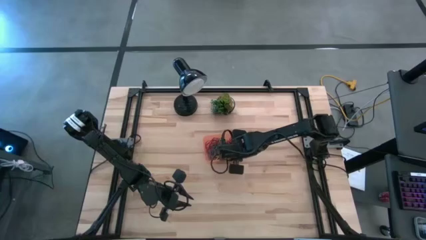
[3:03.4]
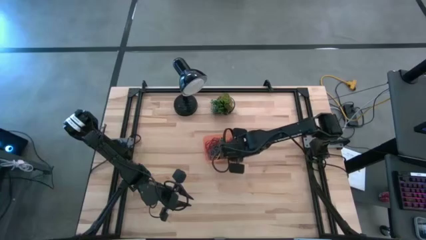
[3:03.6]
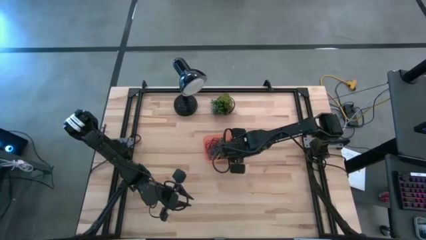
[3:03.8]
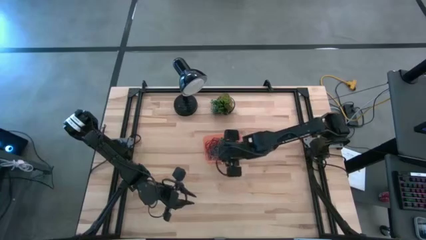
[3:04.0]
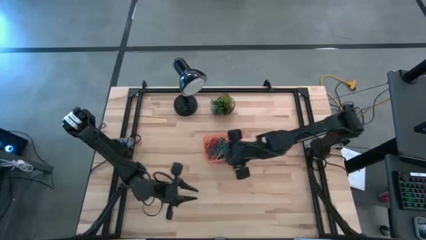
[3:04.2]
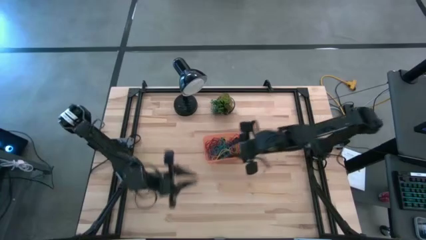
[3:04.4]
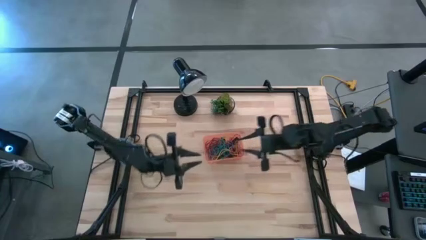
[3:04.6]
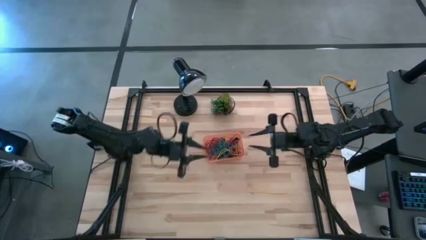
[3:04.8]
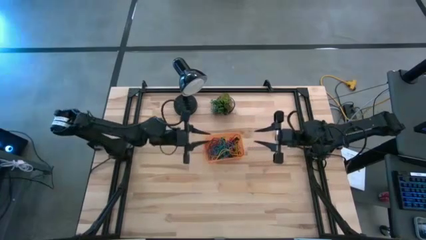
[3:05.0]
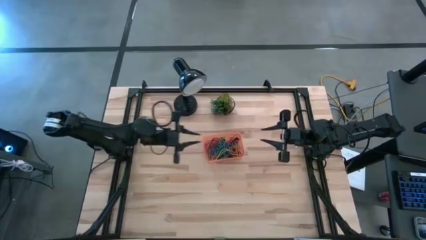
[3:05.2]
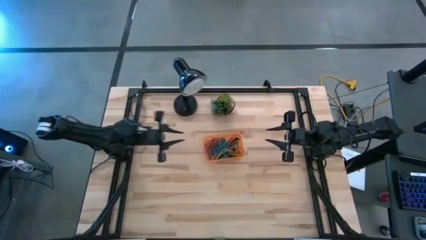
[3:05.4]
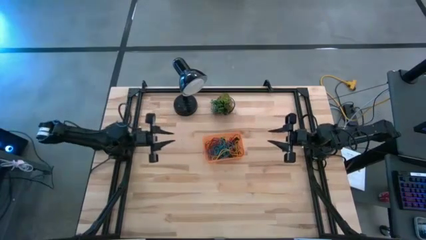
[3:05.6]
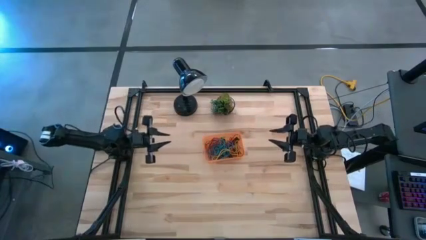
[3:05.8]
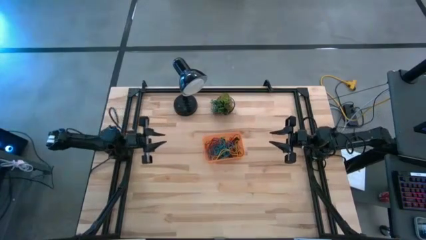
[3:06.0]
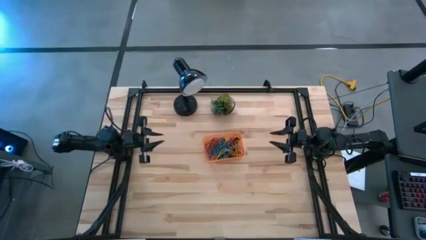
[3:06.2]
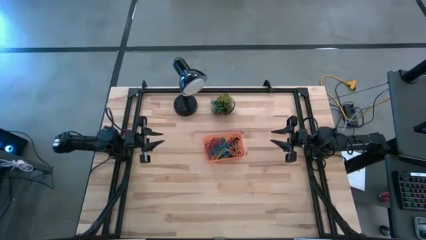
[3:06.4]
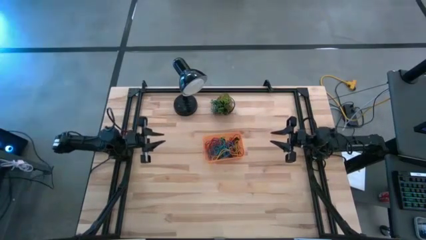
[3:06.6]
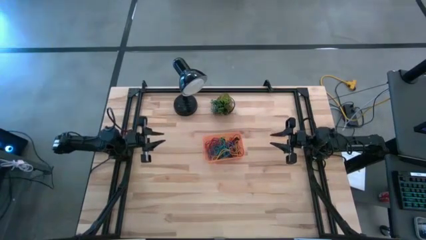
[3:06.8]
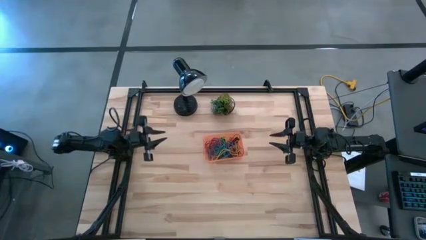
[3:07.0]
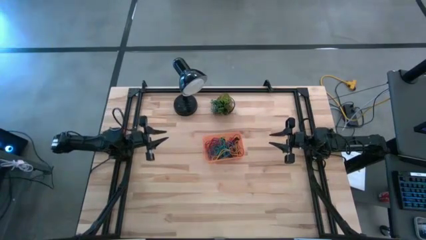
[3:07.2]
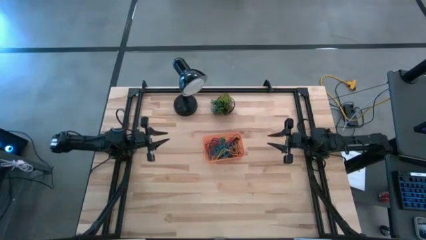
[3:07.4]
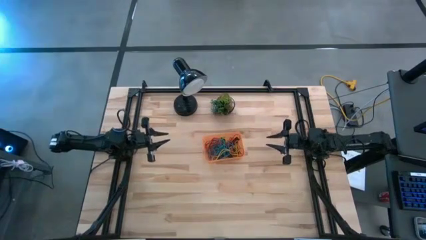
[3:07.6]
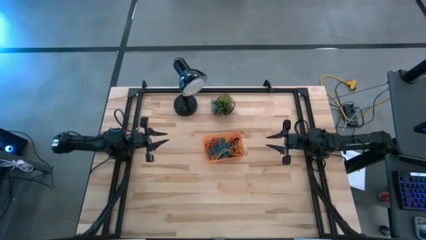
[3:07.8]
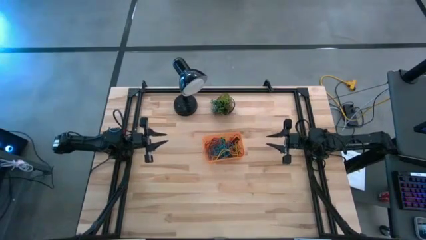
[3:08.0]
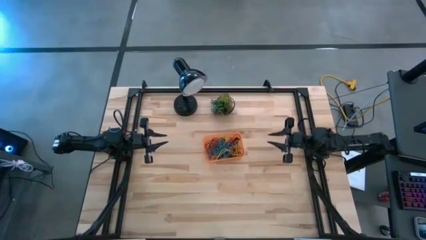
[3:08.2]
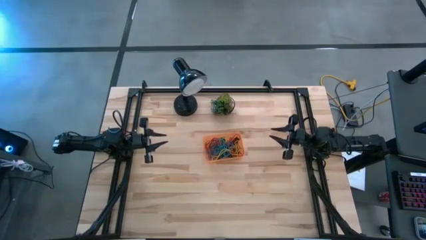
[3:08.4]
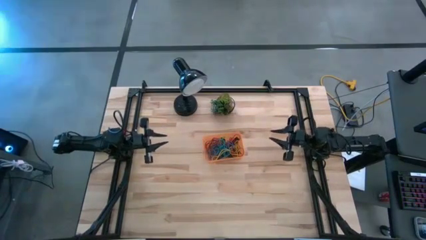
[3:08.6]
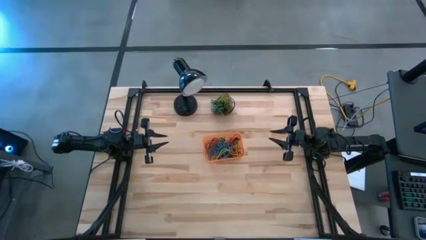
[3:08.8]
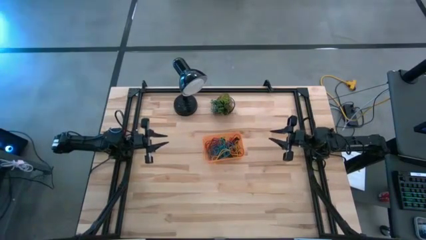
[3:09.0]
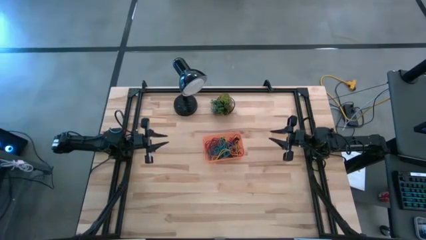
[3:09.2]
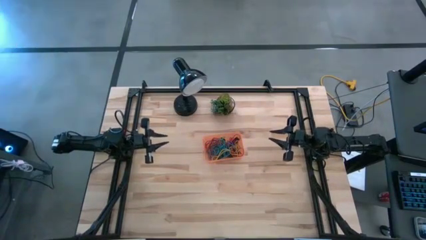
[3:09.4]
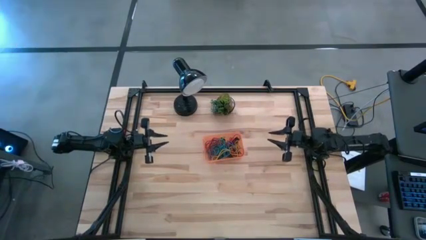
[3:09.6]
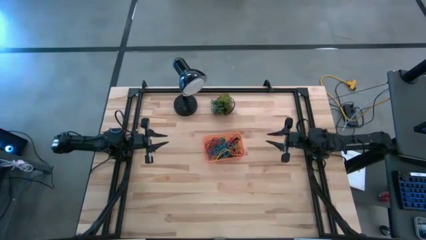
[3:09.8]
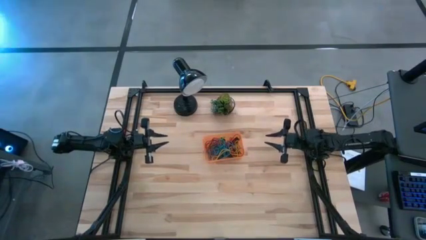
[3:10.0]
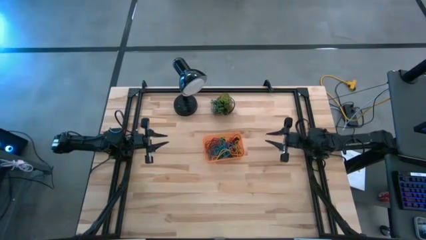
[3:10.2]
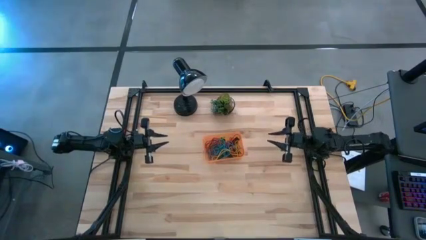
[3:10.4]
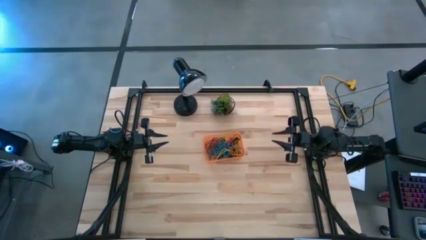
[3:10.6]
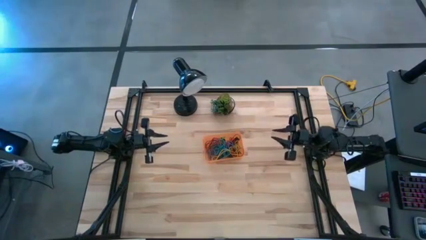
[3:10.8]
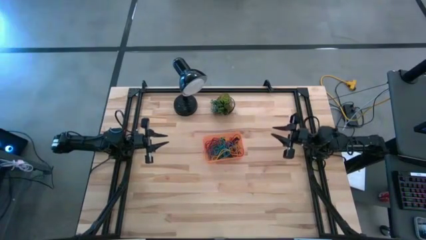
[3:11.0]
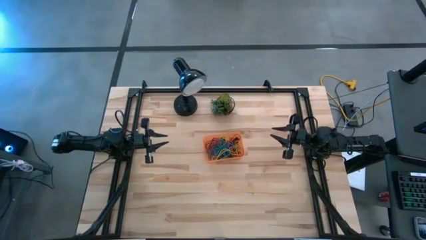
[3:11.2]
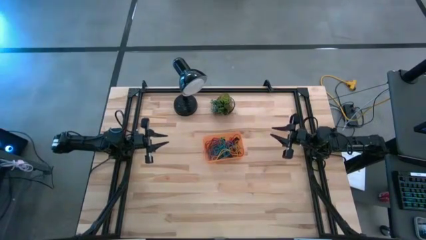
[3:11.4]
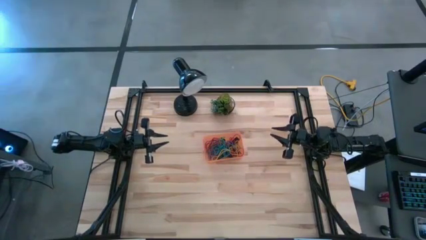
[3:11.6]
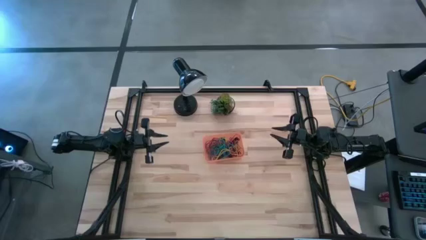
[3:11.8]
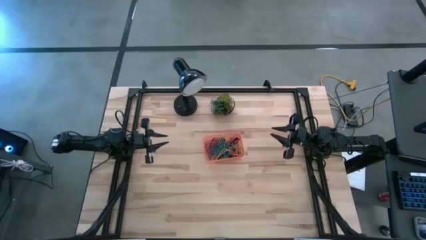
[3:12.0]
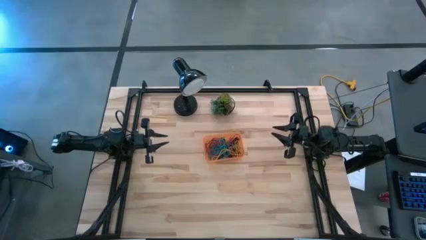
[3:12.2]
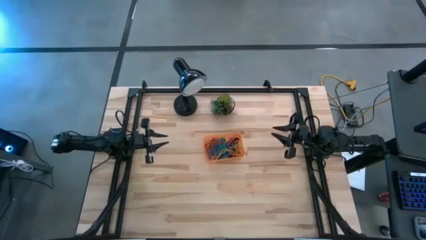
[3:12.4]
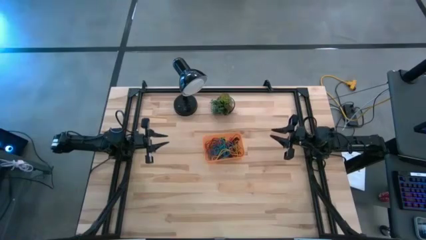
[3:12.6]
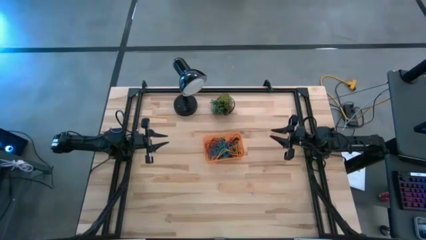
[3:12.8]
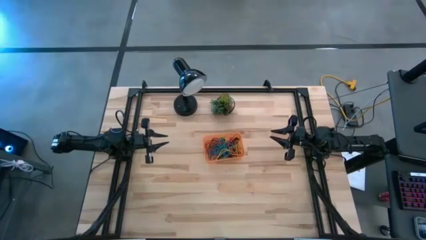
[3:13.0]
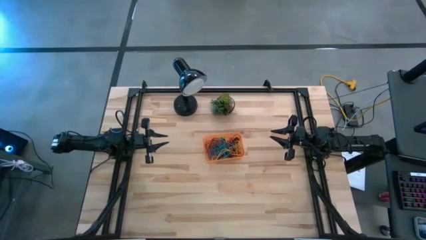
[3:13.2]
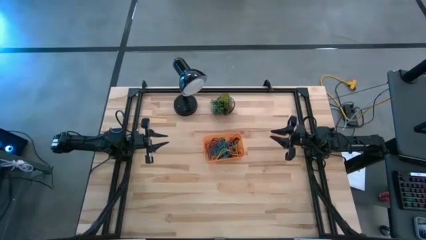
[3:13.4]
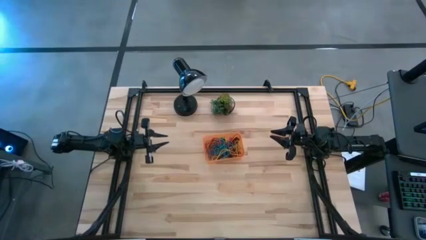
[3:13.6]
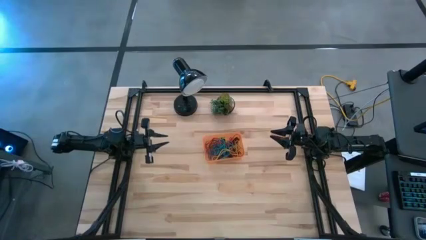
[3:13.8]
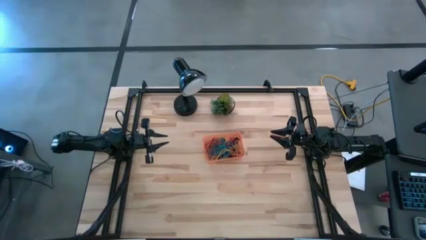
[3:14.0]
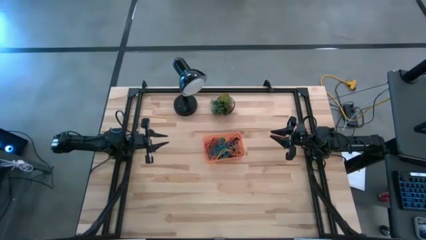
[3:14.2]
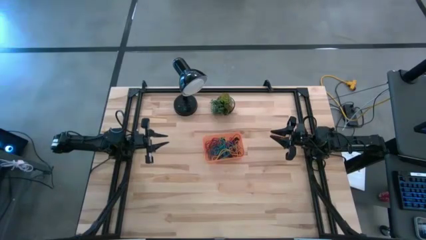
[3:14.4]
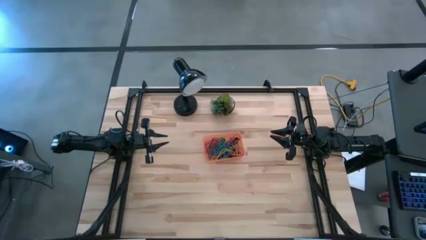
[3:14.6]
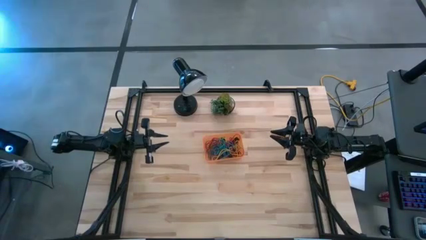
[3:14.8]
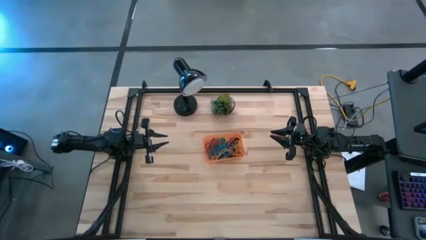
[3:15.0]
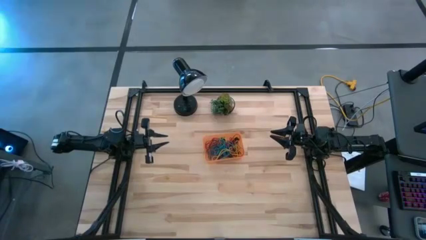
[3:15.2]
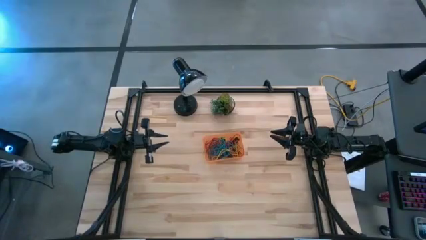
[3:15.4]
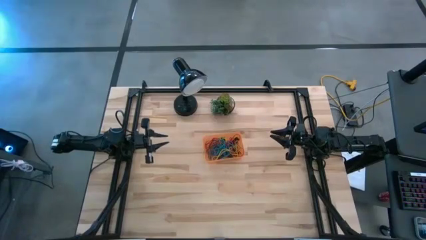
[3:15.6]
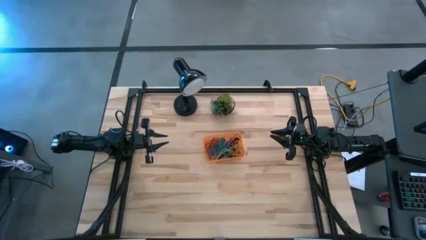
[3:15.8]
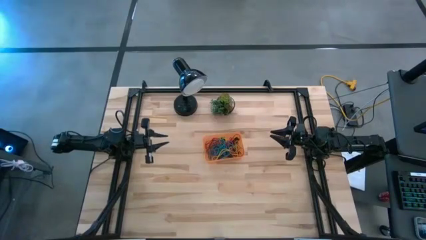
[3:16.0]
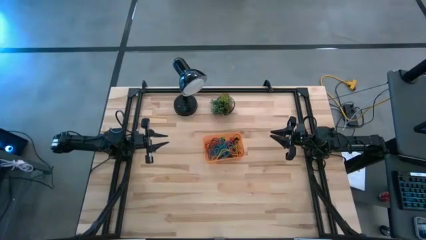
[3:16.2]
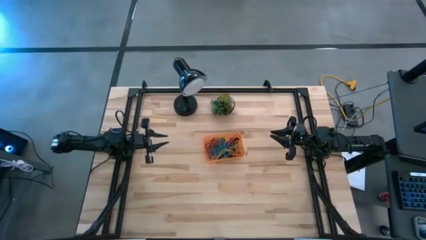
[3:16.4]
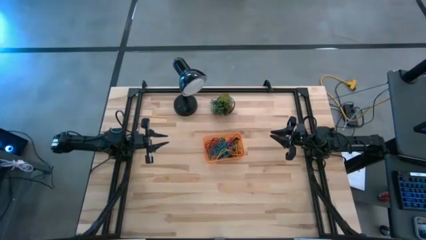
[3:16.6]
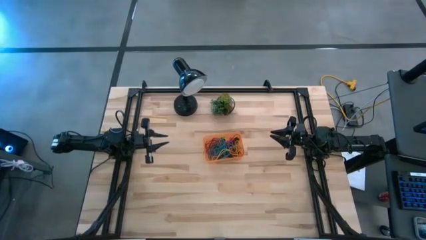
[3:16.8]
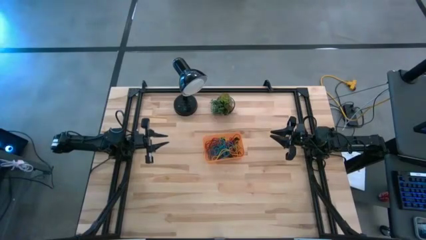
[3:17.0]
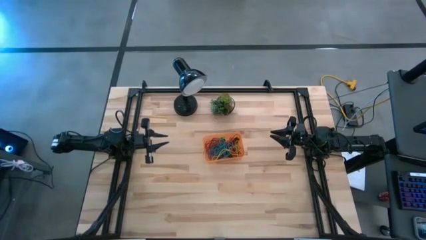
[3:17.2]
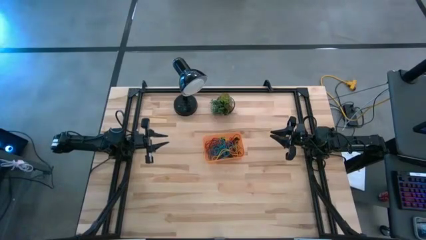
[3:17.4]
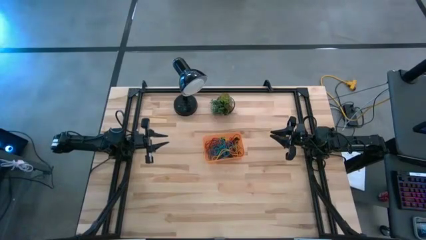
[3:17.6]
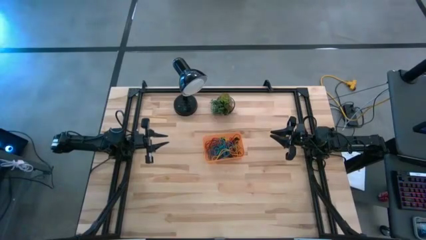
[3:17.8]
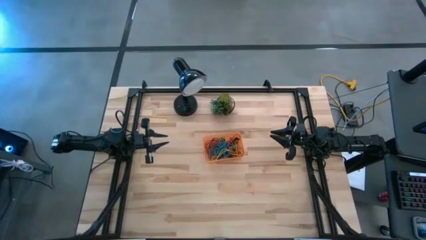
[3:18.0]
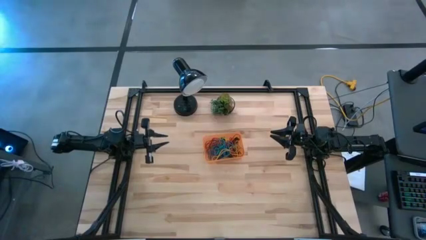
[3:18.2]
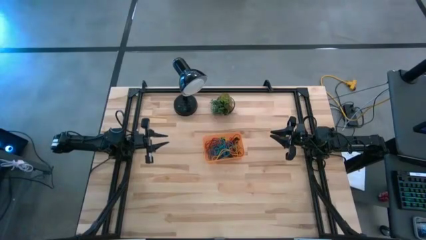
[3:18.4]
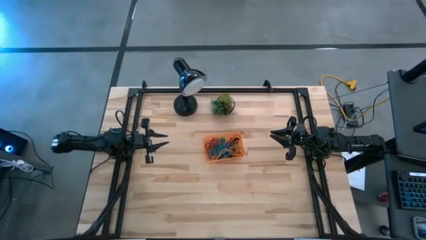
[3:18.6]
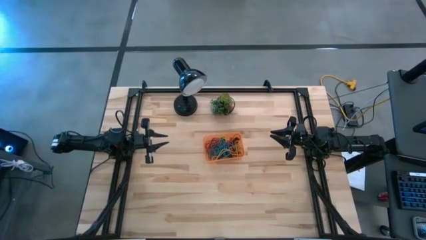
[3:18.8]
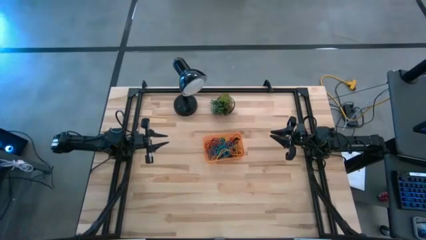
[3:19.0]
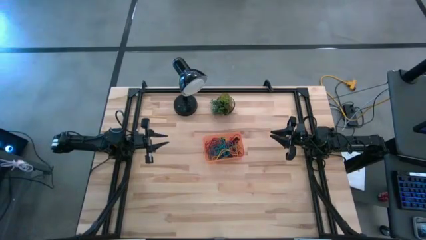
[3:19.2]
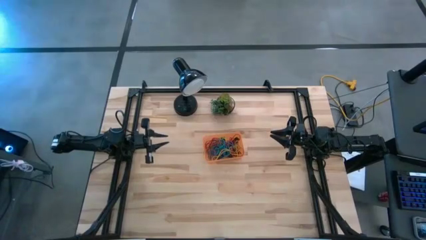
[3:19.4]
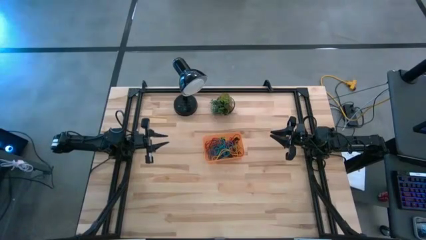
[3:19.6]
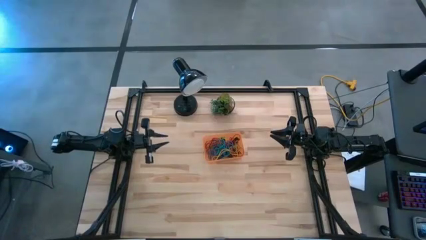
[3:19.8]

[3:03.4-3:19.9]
Task: Pick and place rubber bands into bin
Return to Home Position
